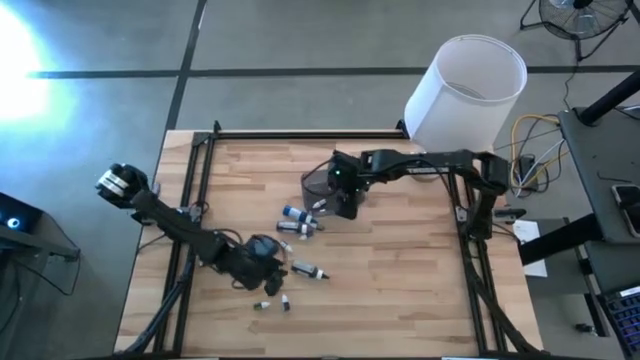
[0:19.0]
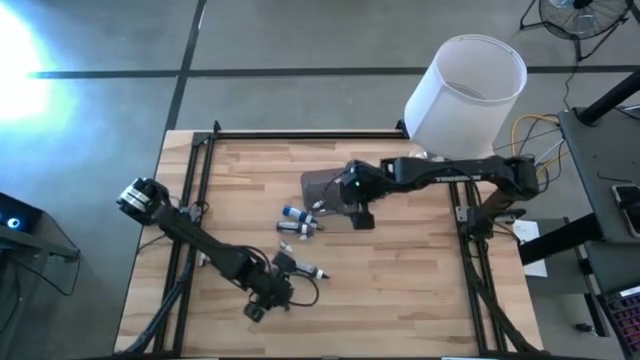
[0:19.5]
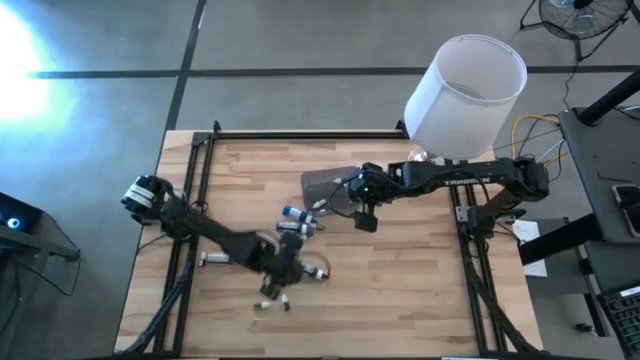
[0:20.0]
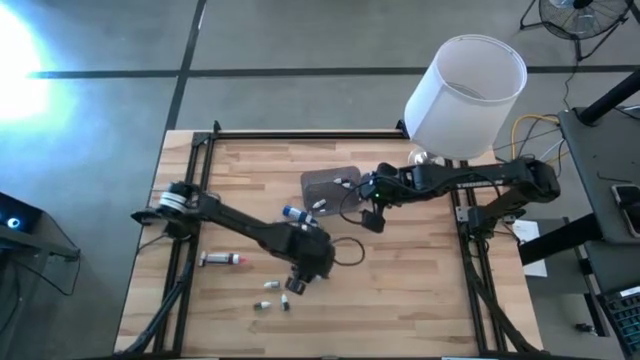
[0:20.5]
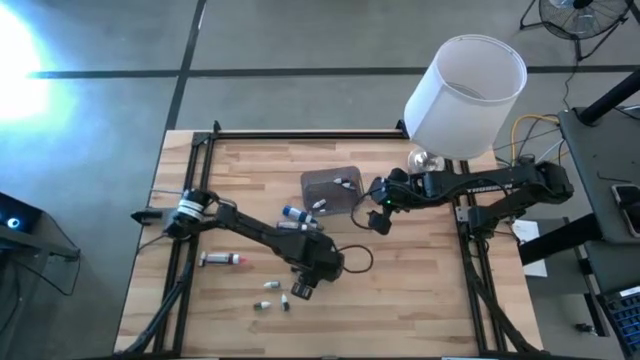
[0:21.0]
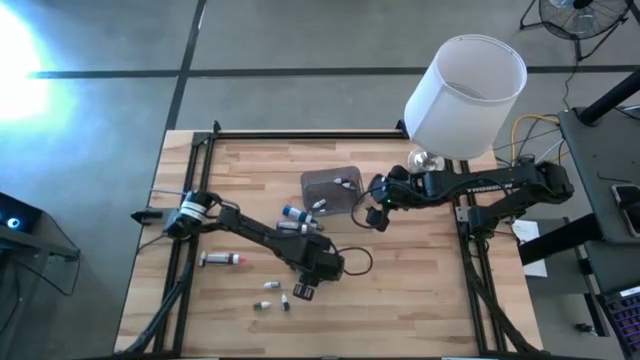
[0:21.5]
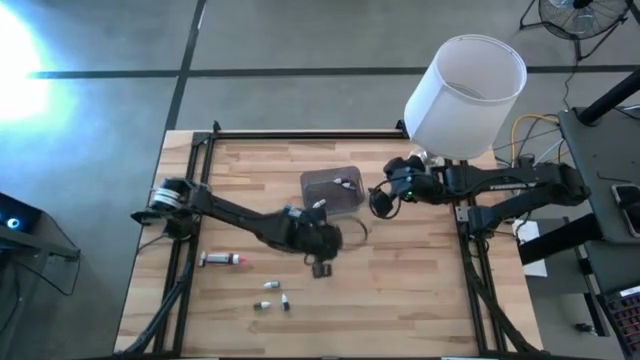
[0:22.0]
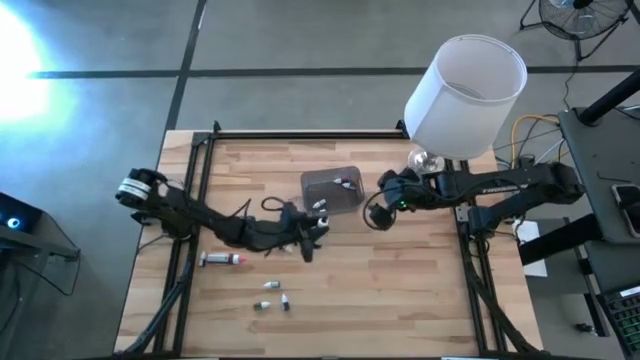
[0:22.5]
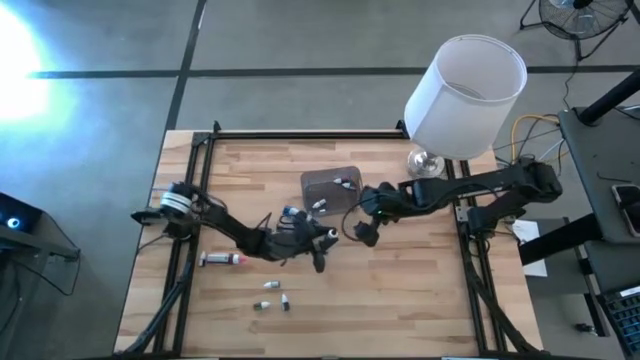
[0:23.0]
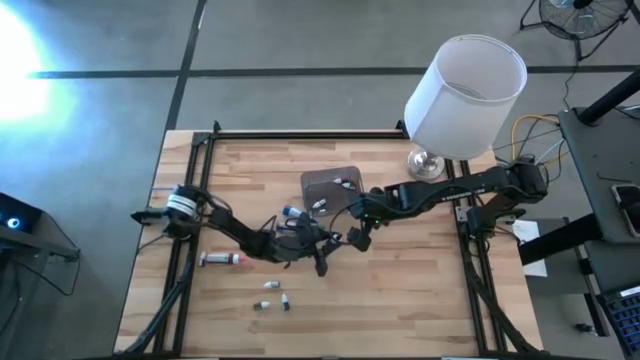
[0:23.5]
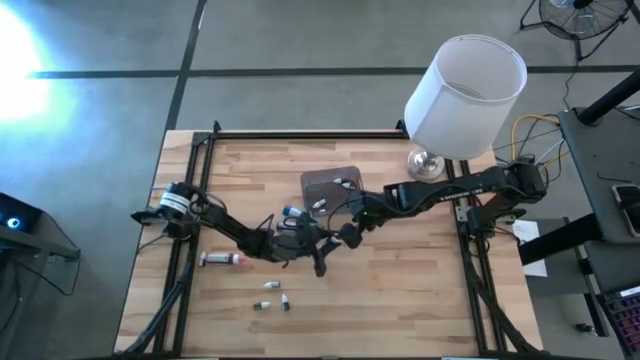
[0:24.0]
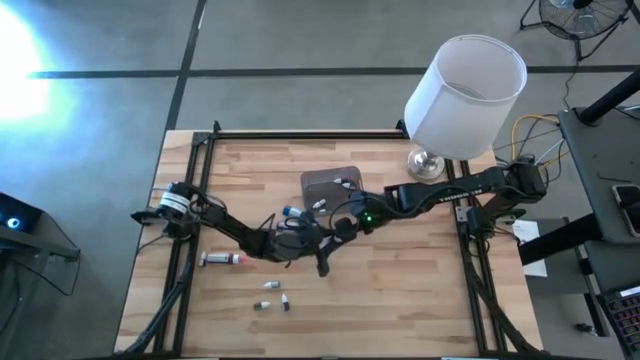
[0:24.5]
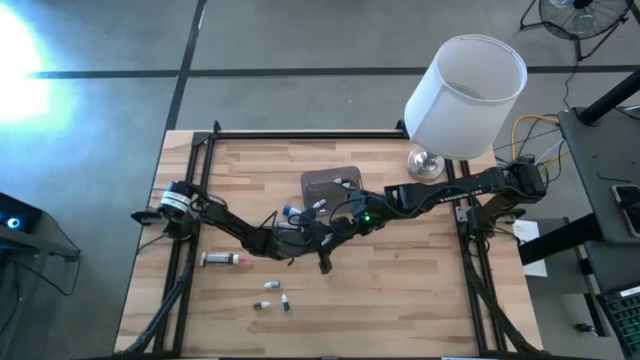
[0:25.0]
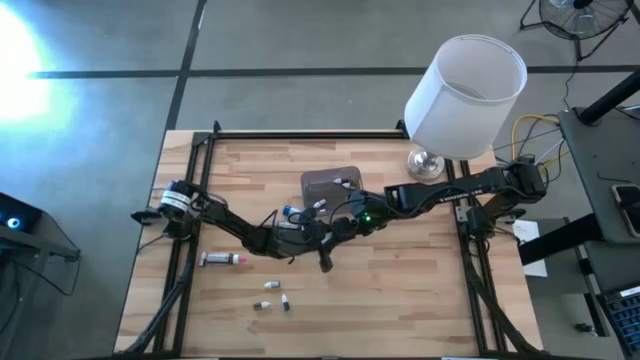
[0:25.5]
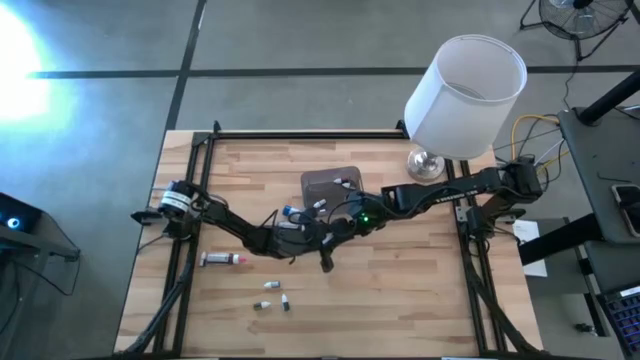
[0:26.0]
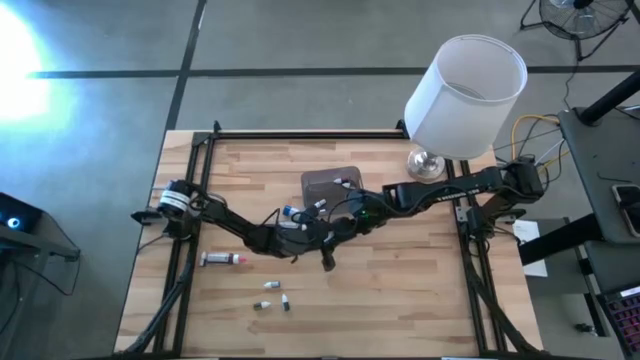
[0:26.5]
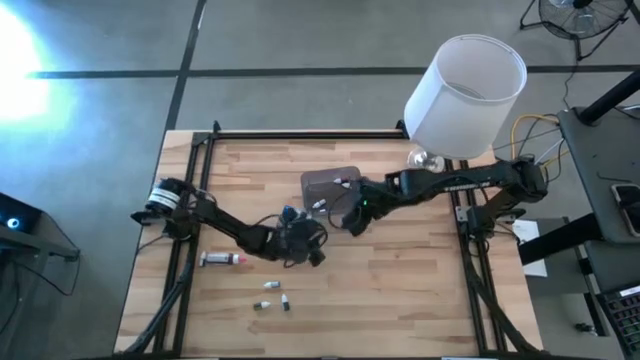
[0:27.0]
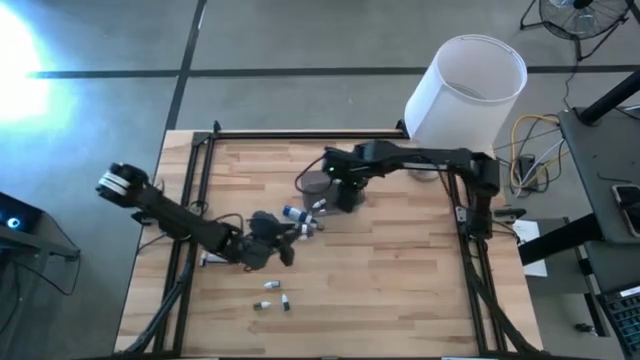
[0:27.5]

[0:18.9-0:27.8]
Task: Pick & Place food coloring
Put the large black food coloring bottle into the bin

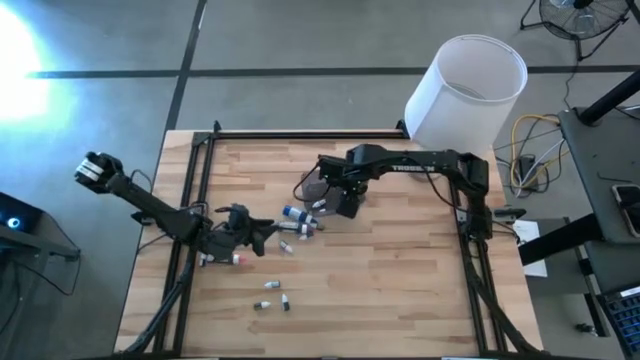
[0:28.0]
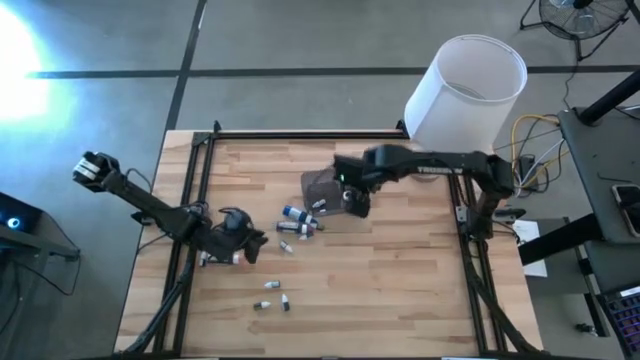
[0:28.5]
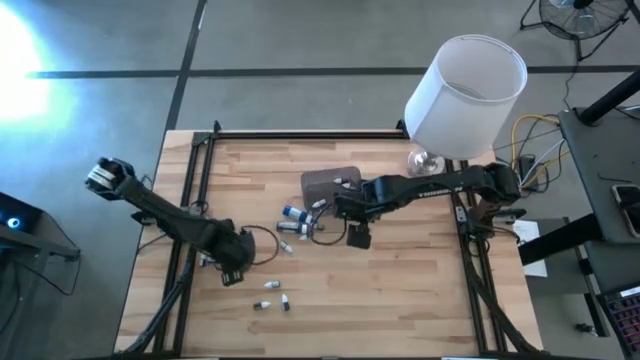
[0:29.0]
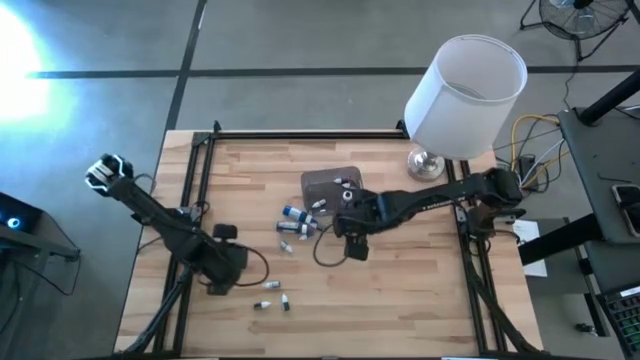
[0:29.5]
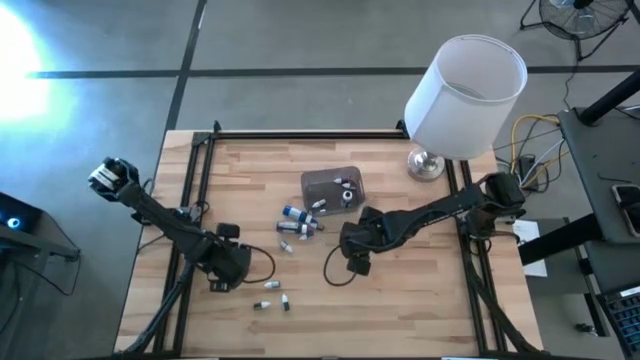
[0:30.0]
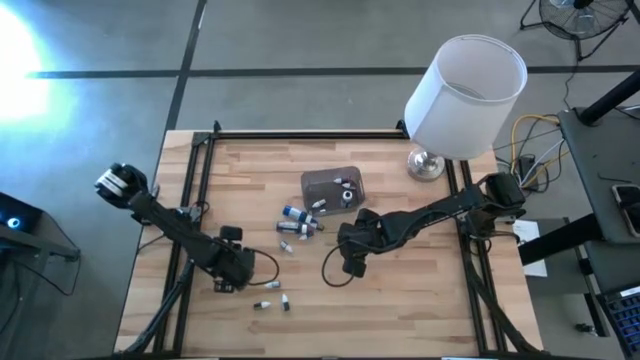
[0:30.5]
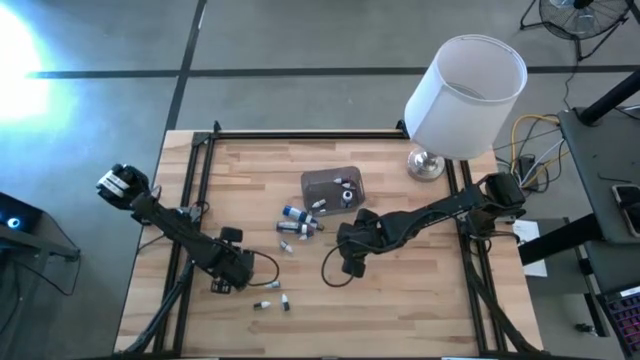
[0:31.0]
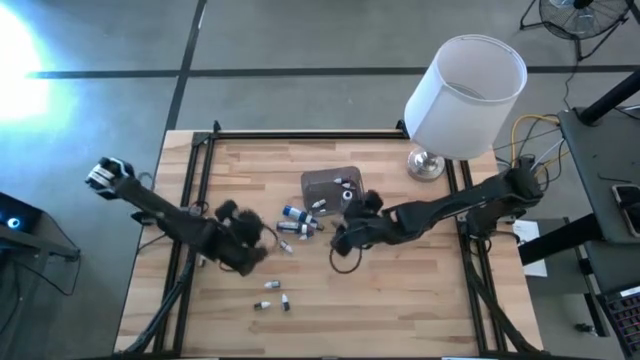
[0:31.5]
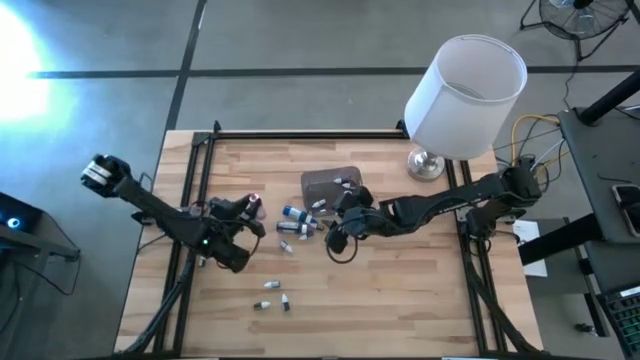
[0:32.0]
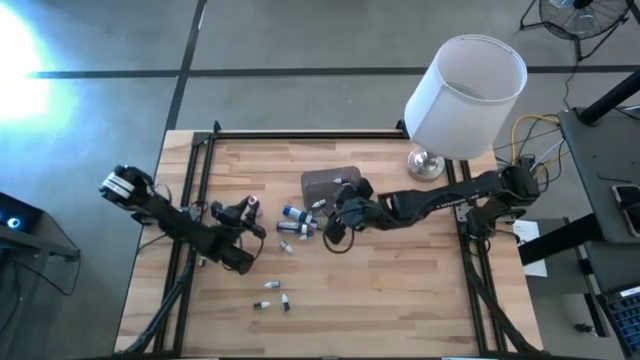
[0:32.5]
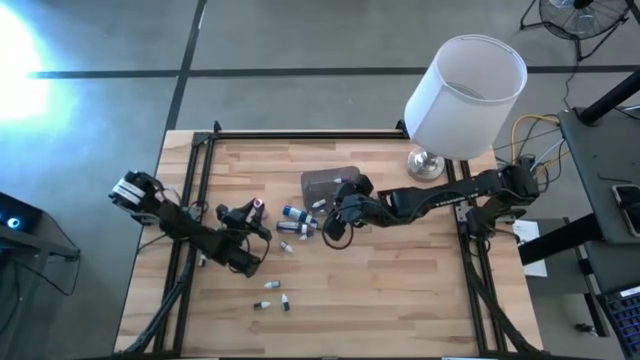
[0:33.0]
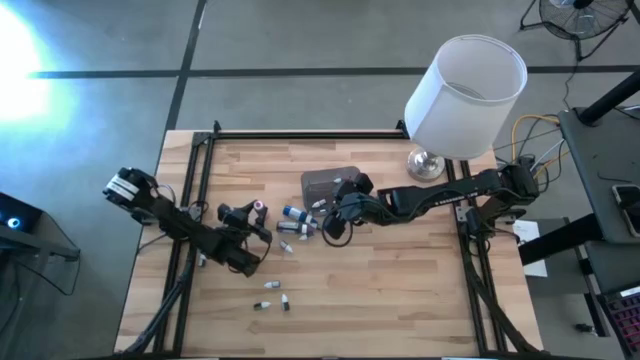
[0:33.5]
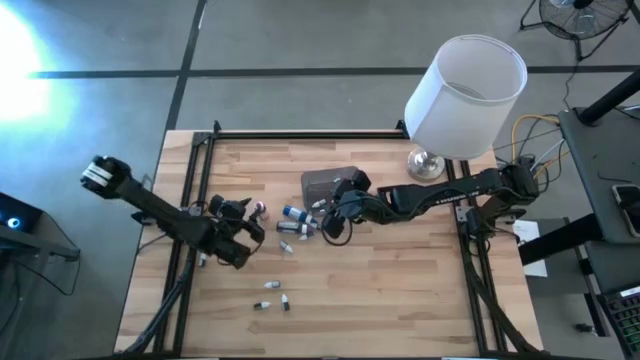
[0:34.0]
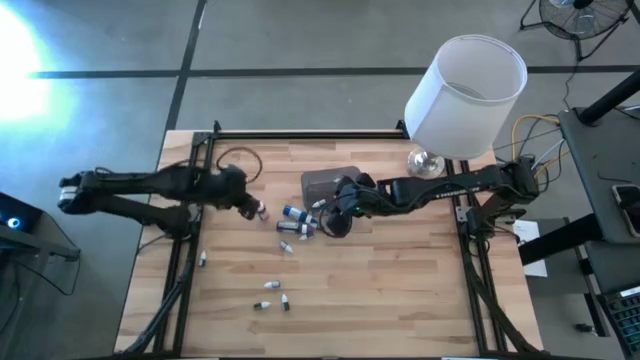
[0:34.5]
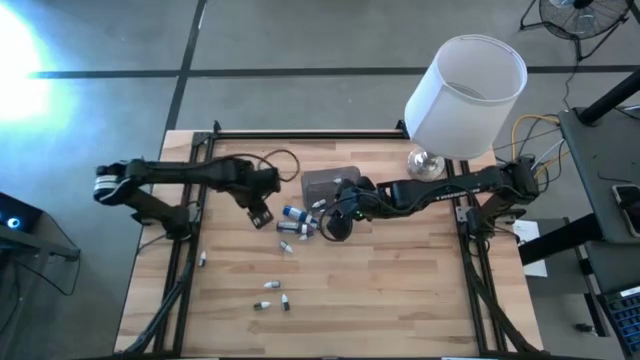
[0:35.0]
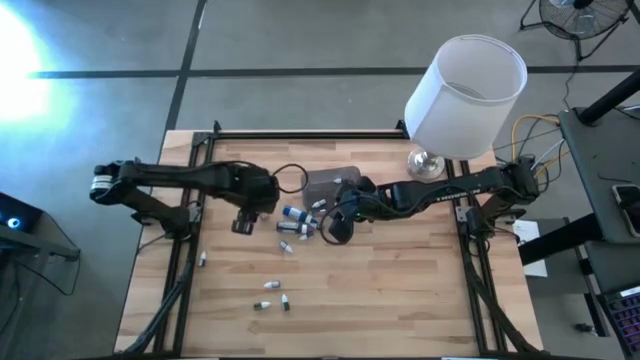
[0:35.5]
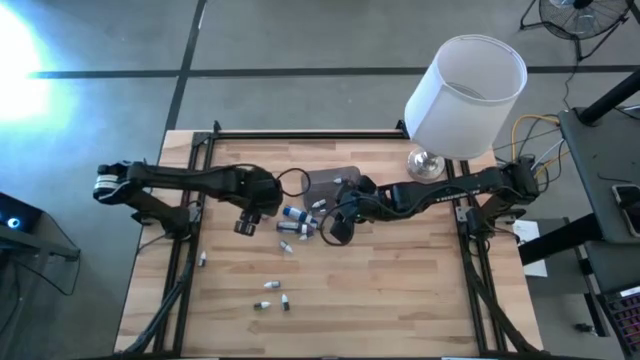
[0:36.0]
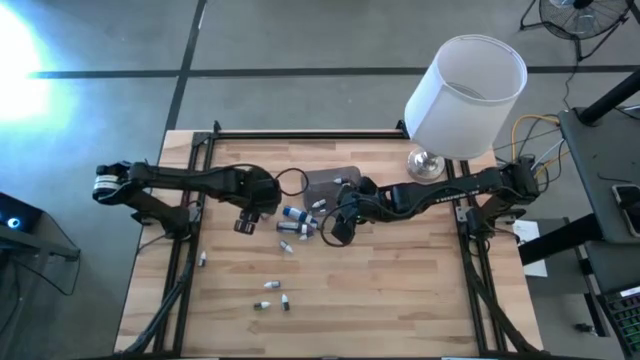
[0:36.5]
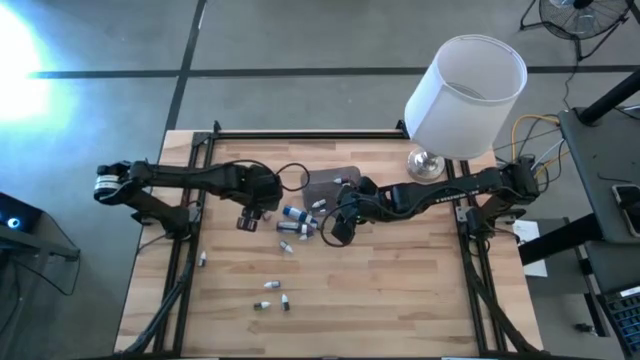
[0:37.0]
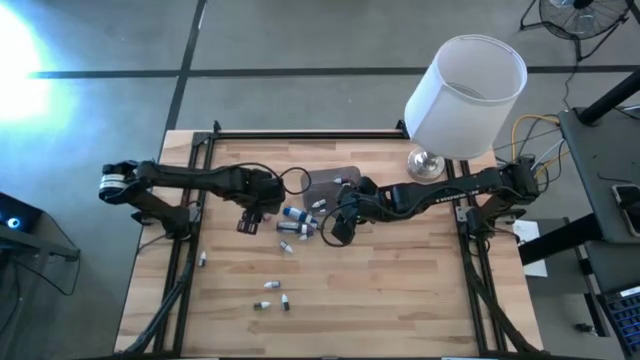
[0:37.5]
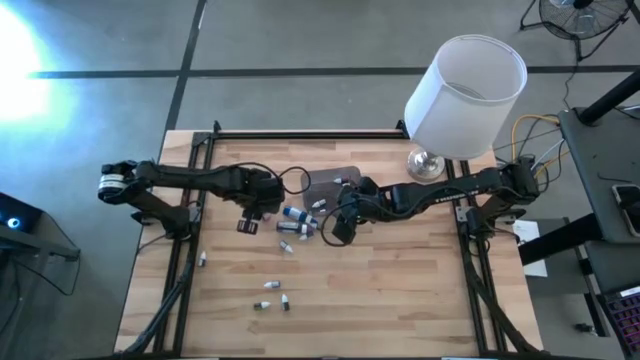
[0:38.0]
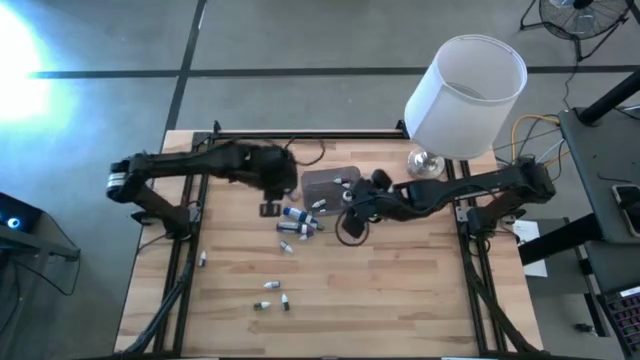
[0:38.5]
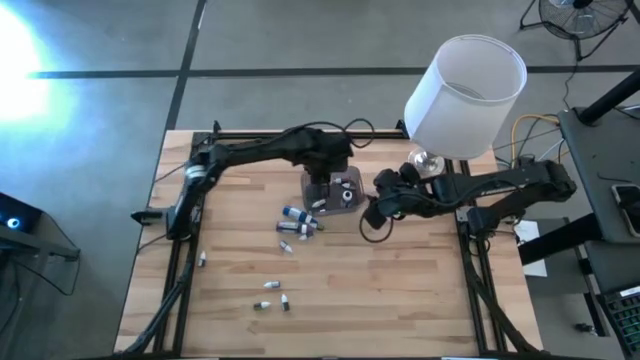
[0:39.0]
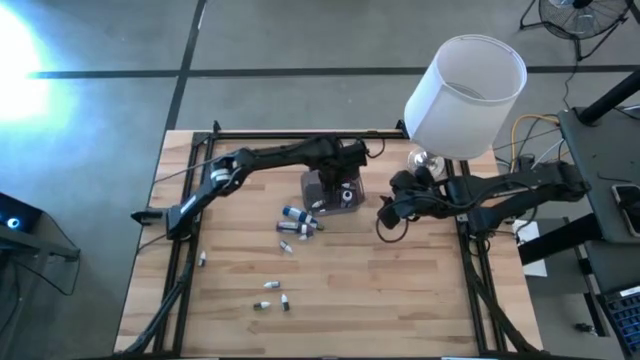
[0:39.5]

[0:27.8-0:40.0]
Put the large pink food coloring bottle into the bin

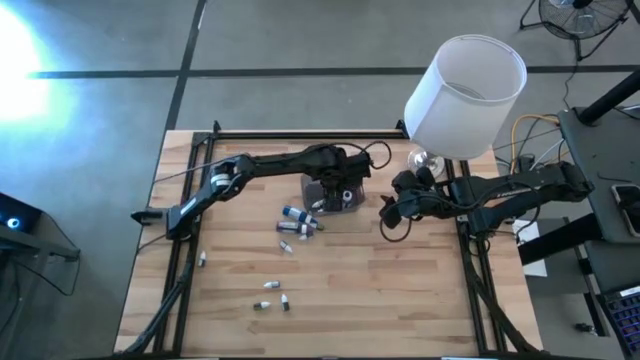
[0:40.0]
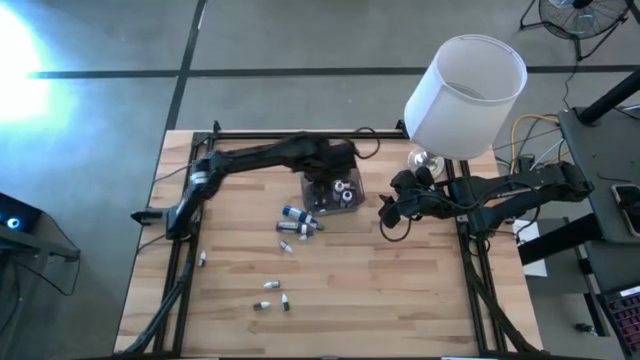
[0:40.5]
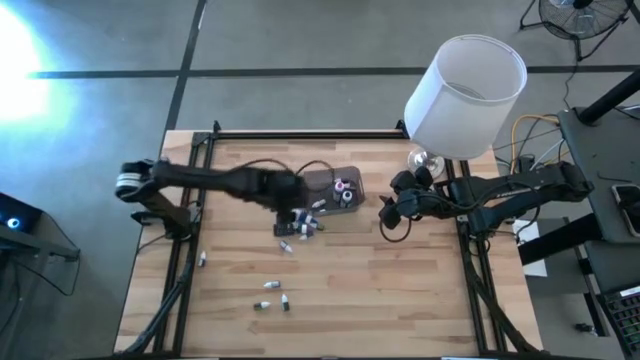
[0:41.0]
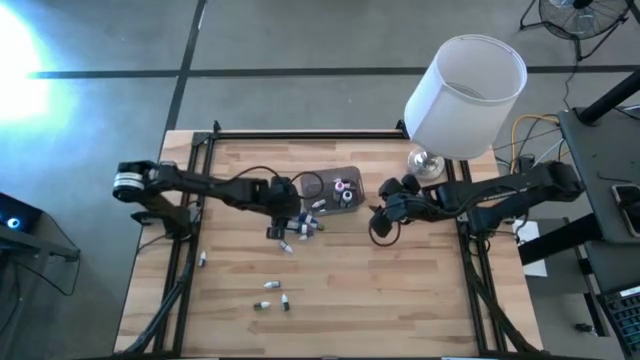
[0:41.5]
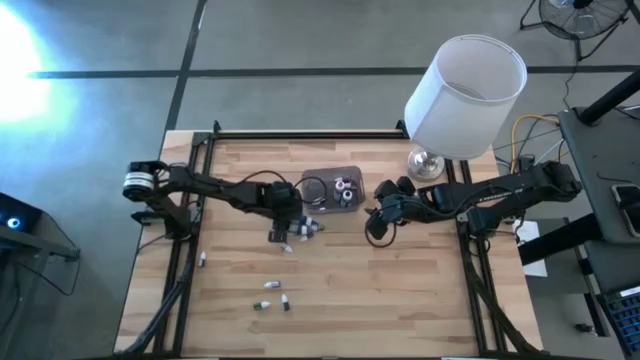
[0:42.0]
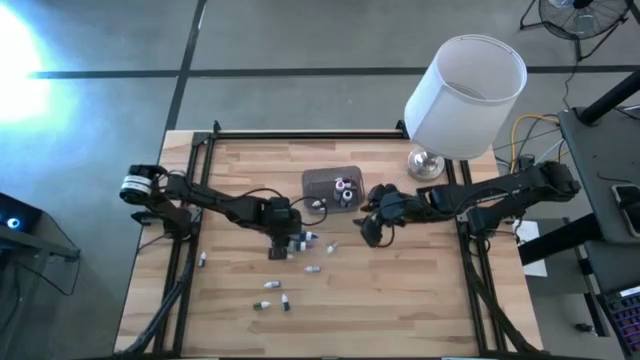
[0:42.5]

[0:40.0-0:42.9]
Put the large blue food coloring bottle into the bin
